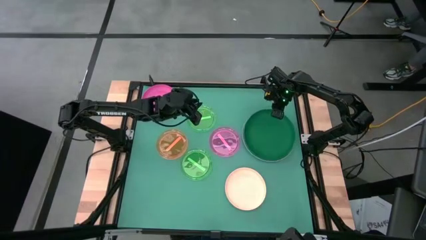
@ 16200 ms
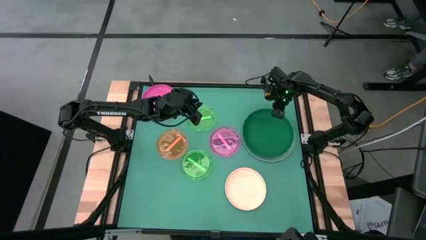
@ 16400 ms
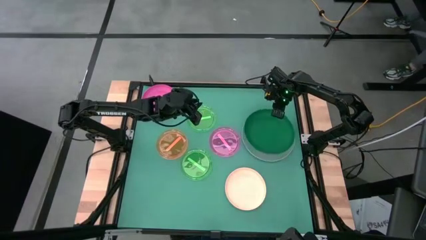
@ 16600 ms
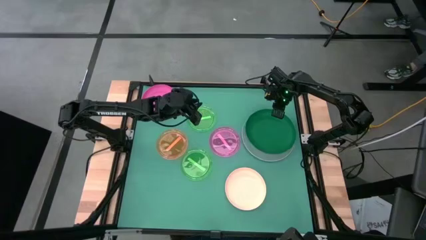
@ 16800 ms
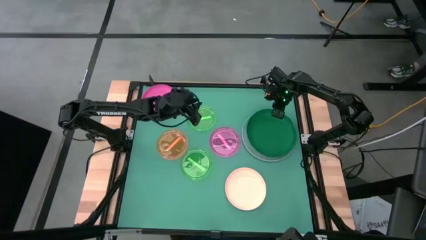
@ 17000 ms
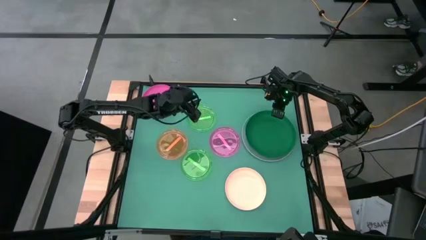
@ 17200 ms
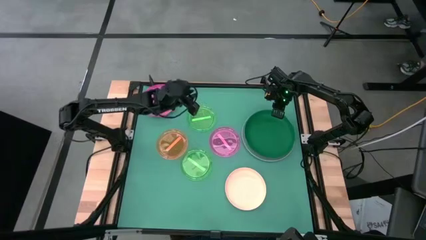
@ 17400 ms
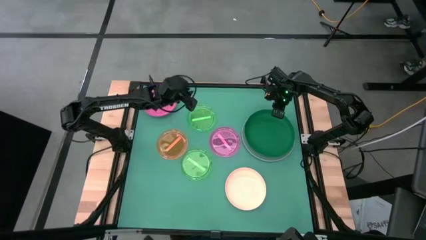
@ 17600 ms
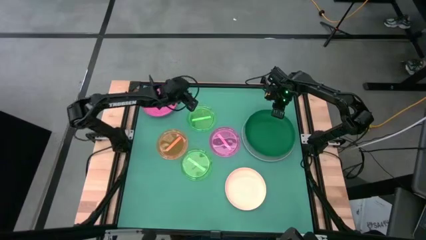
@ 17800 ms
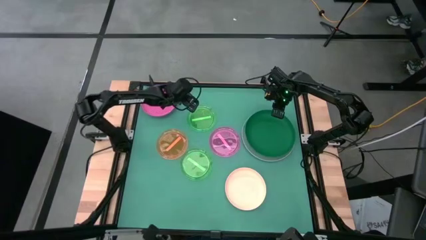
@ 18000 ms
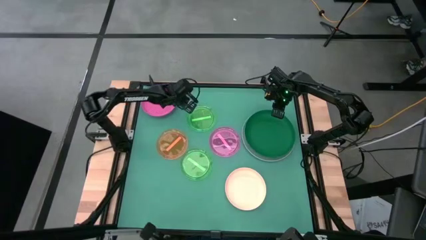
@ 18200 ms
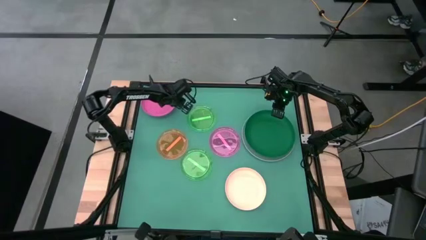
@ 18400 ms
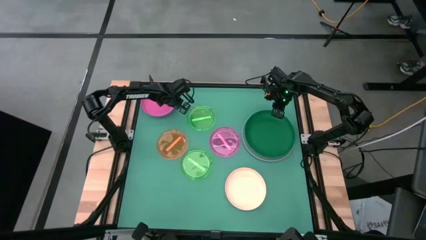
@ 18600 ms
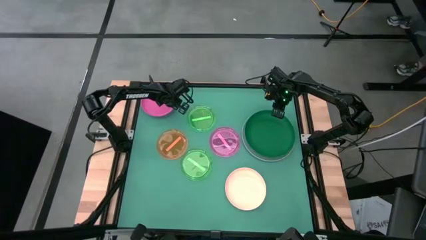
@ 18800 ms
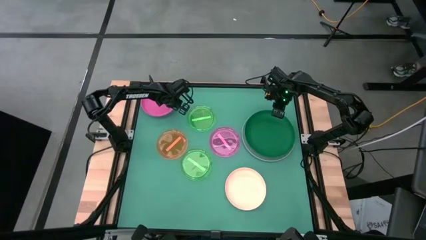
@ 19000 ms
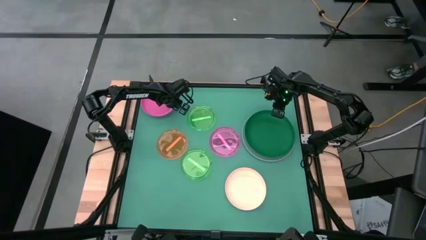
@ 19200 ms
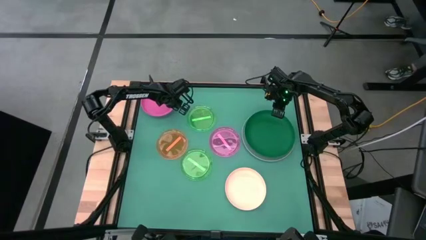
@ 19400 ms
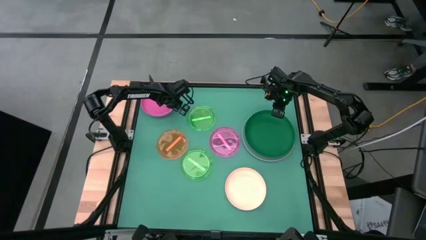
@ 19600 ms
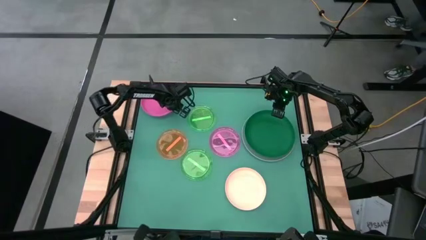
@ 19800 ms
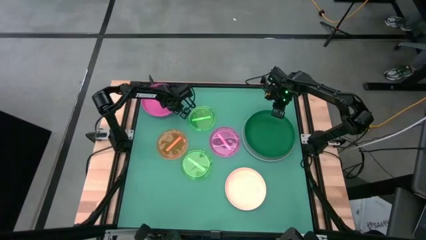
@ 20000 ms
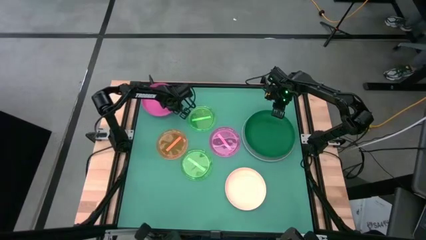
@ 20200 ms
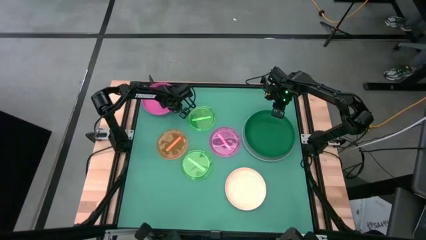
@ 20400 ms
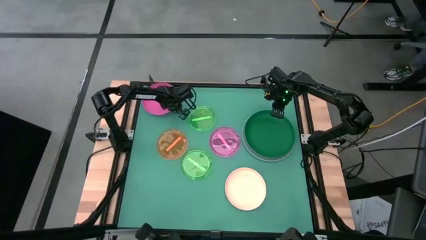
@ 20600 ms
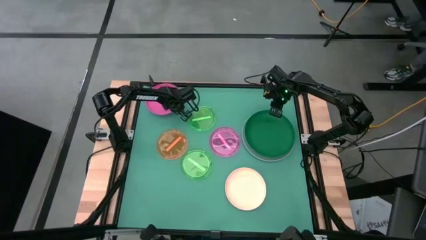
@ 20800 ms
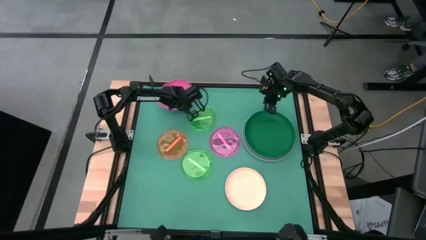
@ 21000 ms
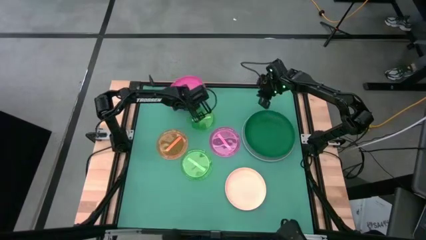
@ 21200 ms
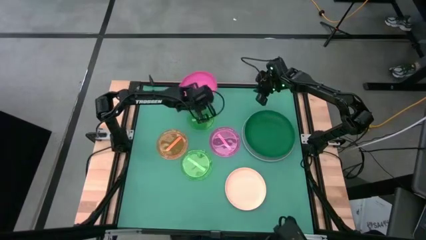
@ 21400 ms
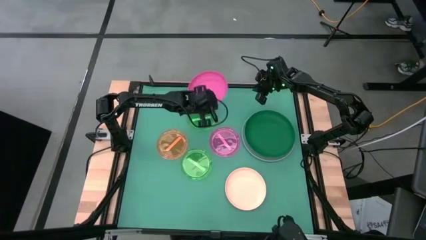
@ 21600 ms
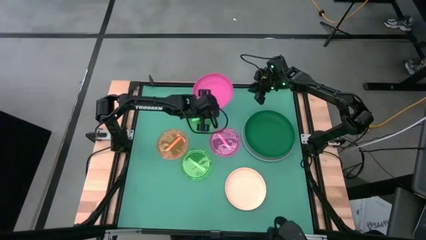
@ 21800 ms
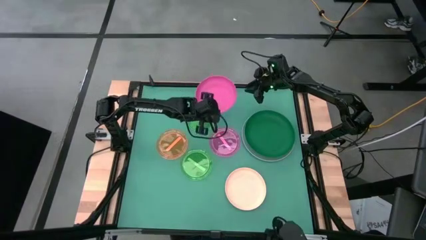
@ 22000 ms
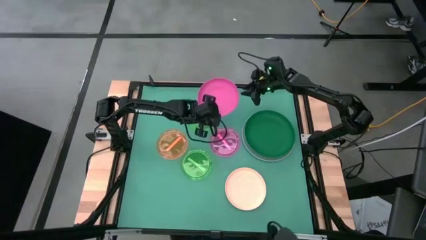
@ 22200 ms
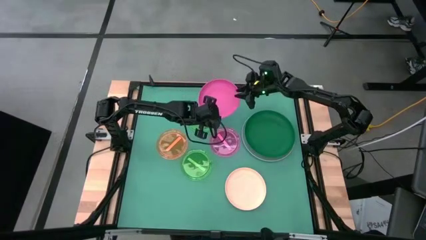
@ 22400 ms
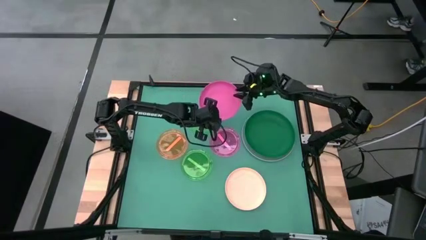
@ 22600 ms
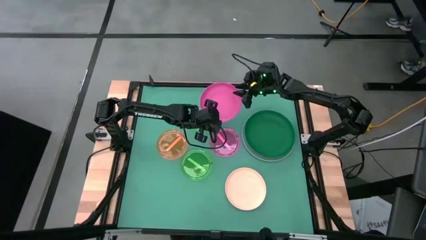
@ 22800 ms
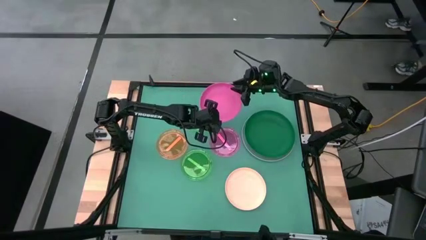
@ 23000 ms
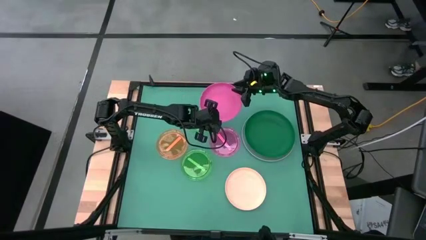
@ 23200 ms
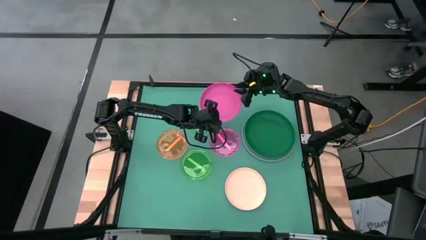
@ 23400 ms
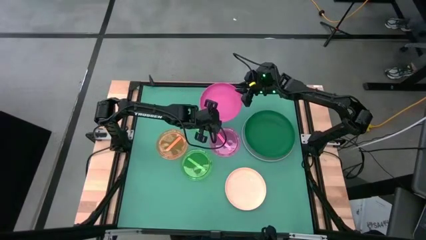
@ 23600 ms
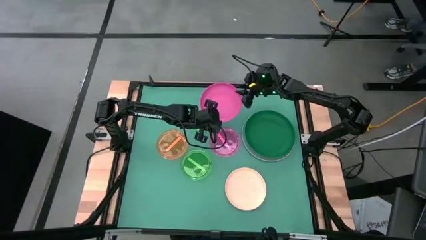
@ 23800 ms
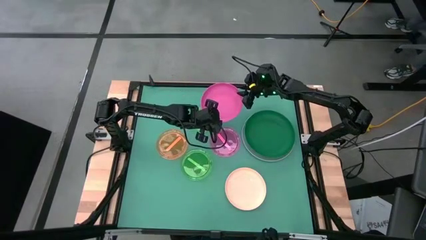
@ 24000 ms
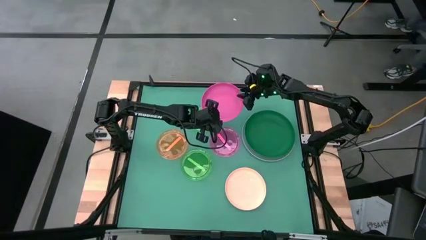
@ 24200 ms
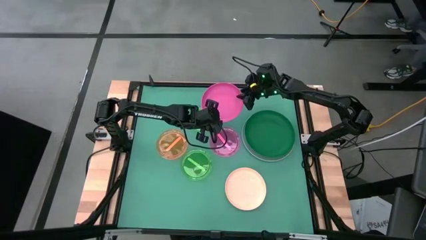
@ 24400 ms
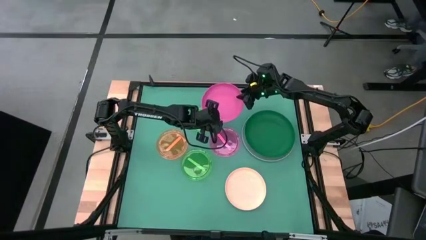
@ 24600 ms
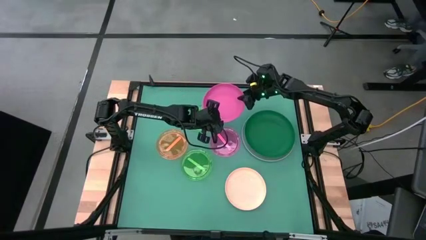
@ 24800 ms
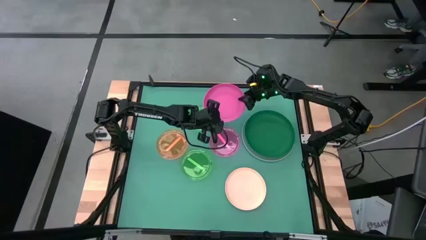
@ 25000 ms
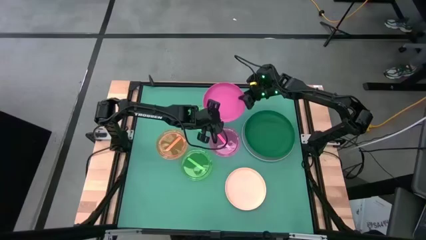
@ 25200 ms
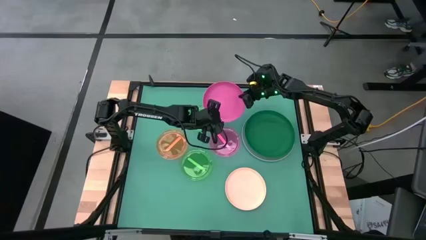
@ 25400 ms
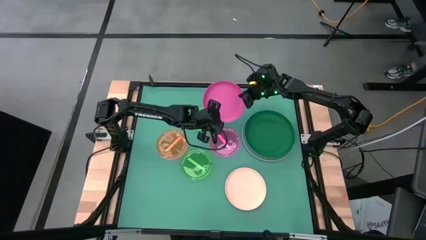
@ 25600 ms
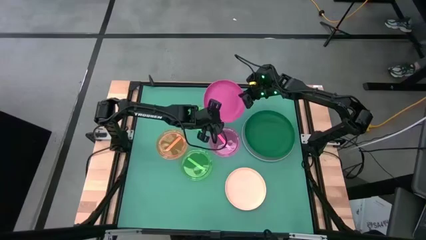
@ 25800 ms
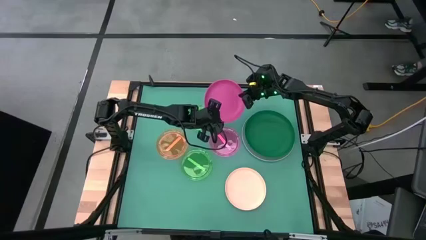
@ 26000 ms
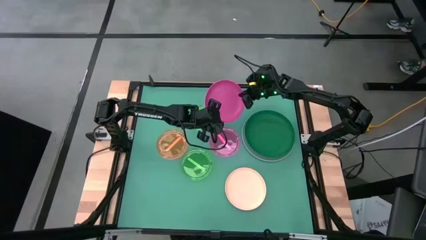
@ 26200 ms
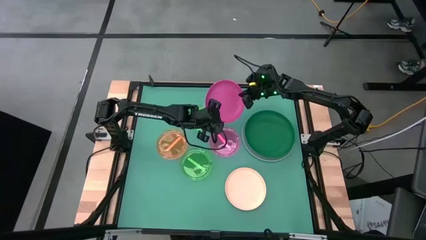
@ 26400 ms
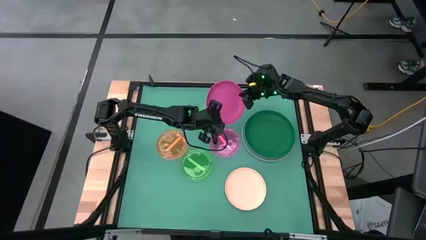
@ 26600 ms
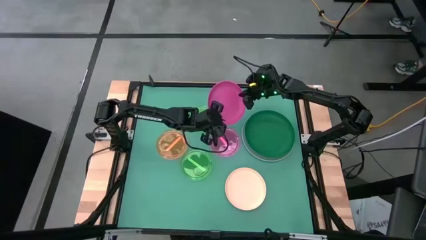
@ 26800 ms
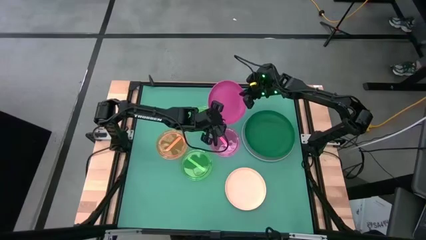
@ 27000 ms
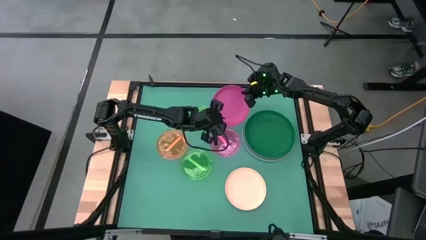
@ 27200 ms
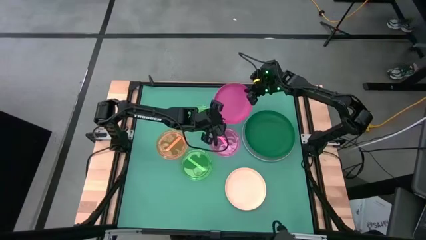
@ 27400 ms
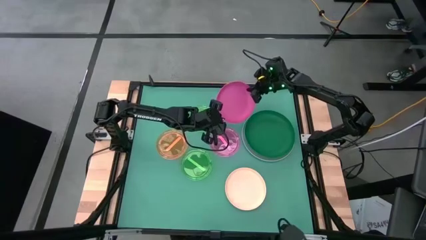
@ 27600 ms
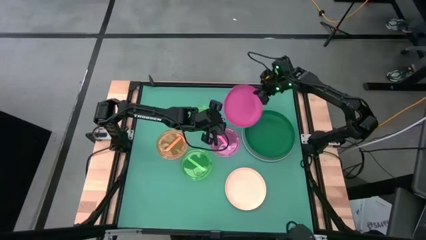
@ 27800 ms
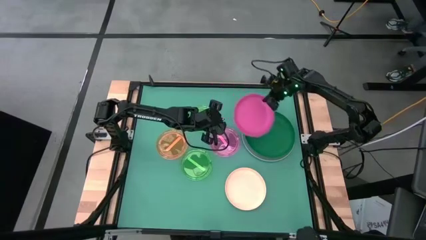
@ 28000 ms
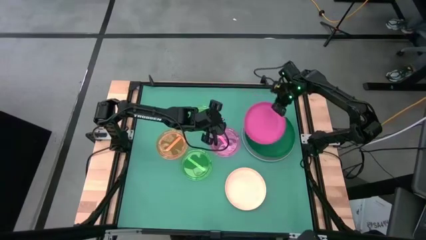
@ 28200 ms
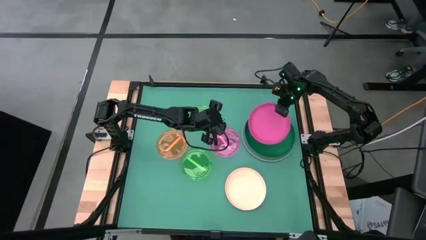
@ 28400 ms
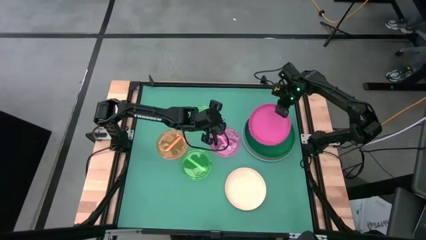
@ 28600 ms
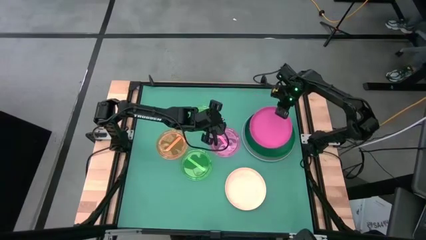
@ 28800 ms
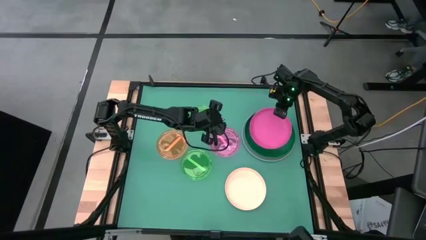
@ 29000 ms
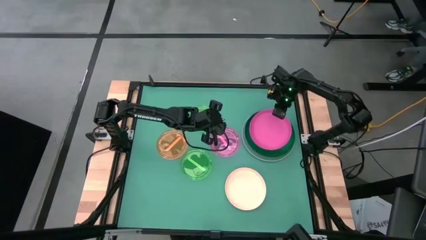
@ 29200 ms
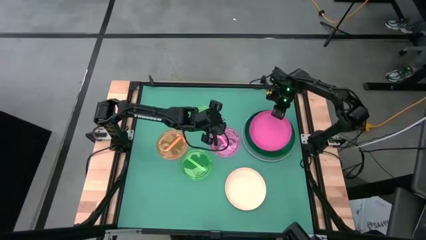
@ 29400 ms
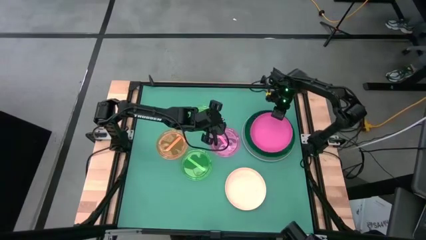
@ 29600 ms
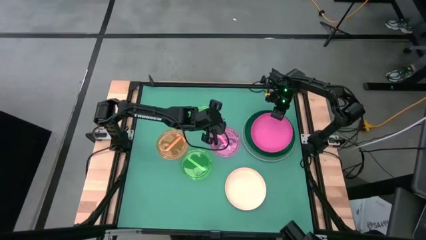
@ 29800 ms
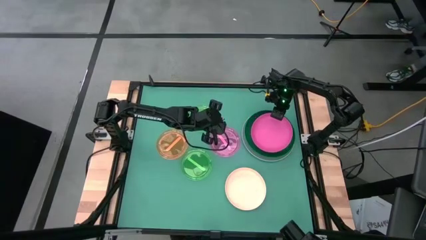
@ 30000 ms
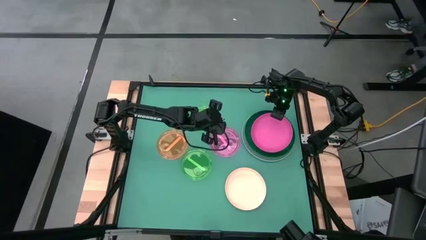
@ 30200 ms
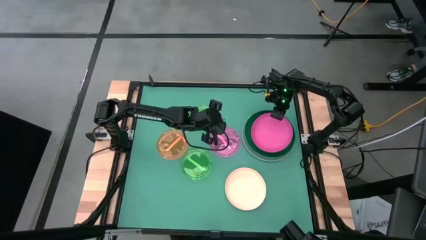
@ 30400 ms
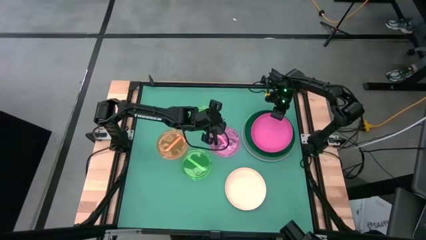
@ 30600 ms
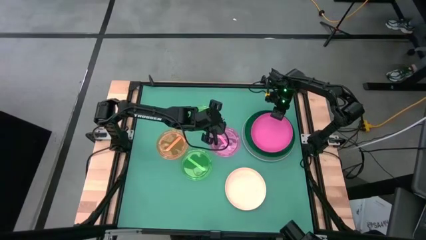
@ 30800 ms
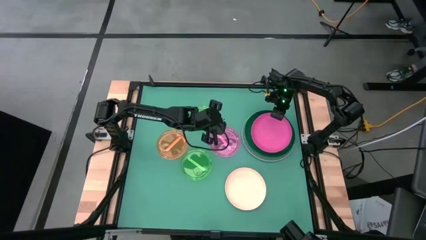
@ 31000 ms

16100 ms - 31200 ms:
Task: Stack plastic plates
Stack the pink plate on top of the green plate
